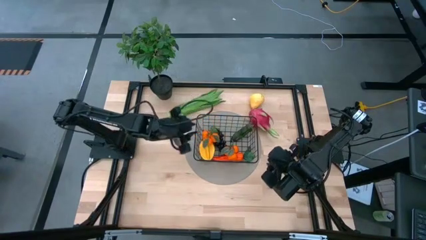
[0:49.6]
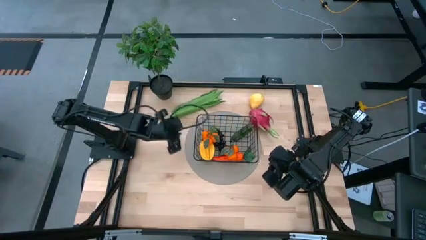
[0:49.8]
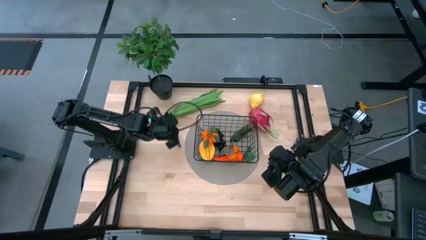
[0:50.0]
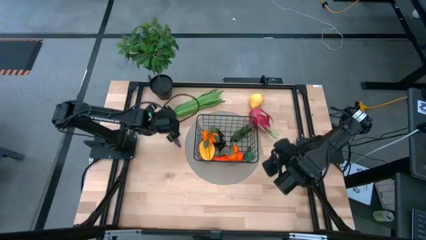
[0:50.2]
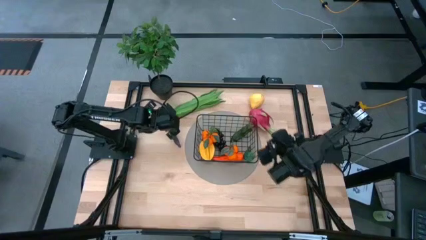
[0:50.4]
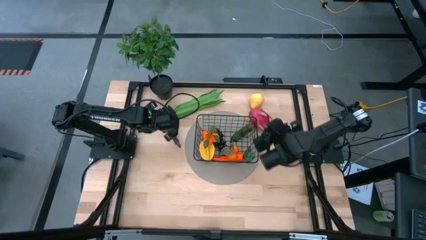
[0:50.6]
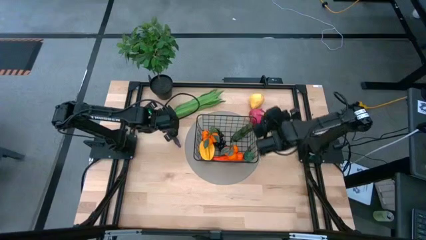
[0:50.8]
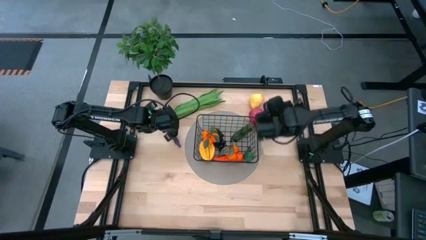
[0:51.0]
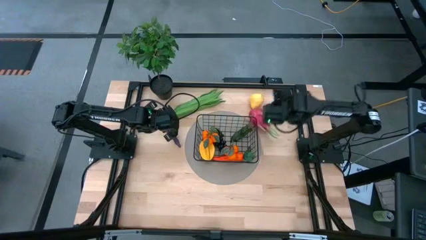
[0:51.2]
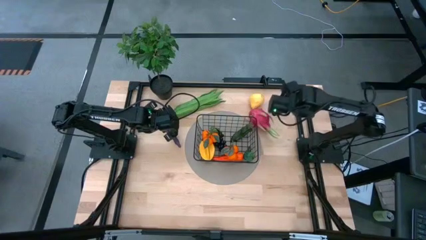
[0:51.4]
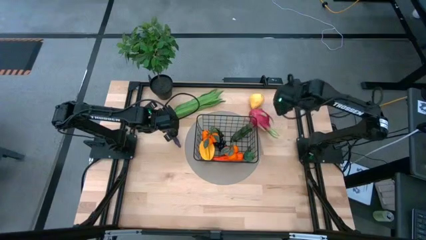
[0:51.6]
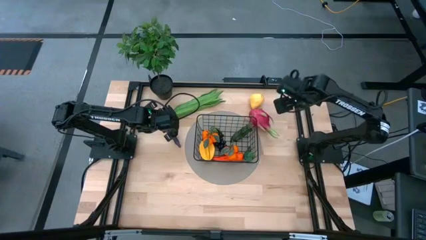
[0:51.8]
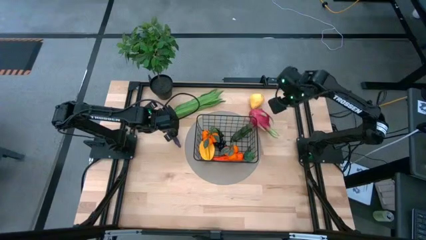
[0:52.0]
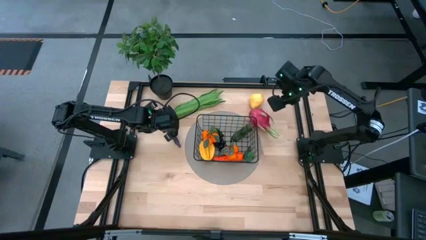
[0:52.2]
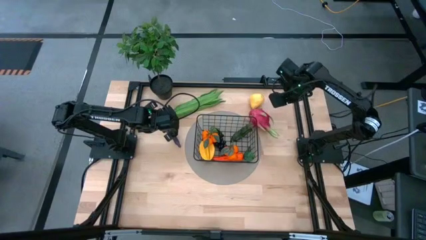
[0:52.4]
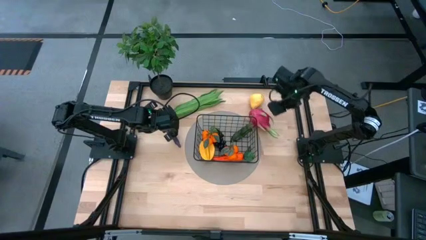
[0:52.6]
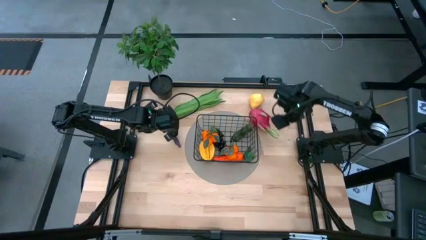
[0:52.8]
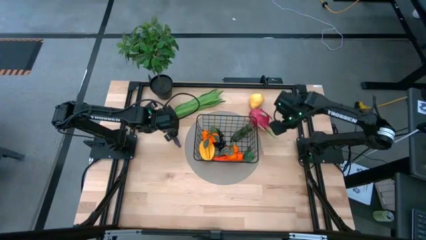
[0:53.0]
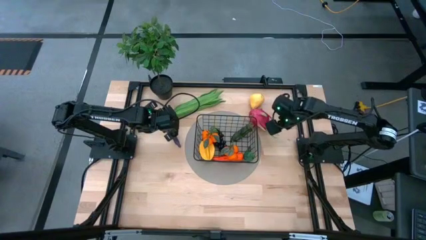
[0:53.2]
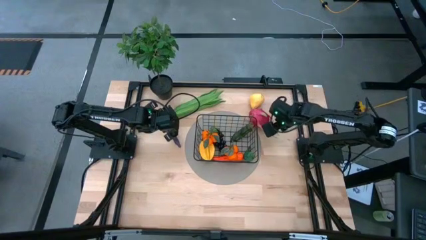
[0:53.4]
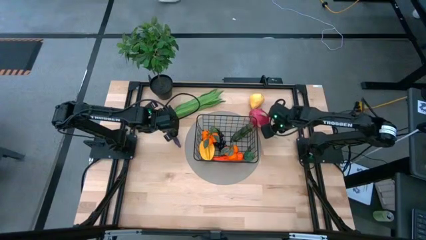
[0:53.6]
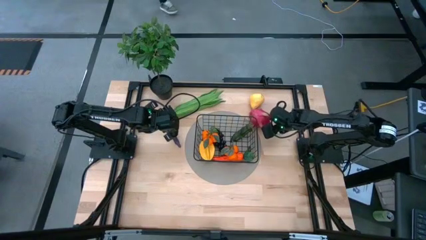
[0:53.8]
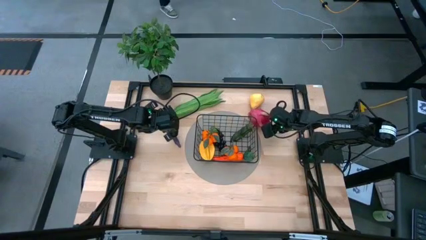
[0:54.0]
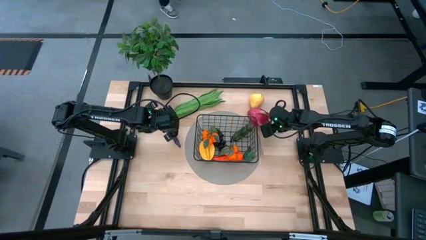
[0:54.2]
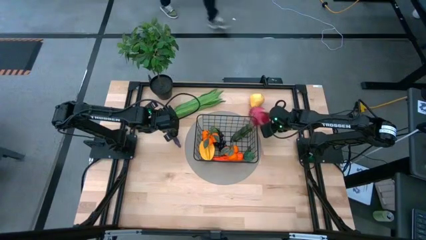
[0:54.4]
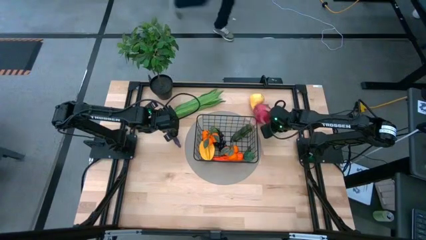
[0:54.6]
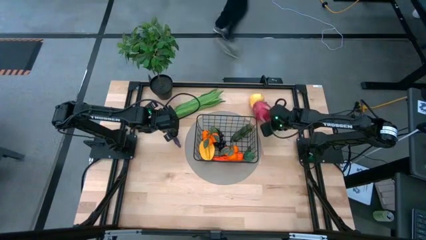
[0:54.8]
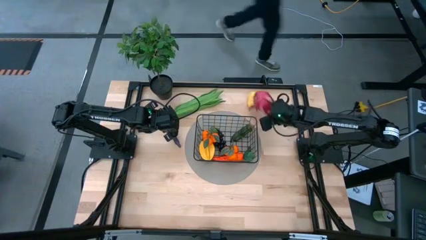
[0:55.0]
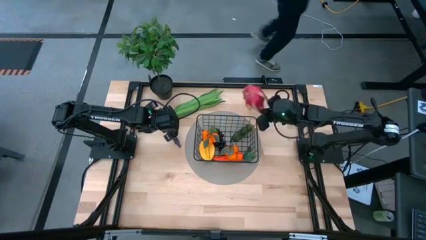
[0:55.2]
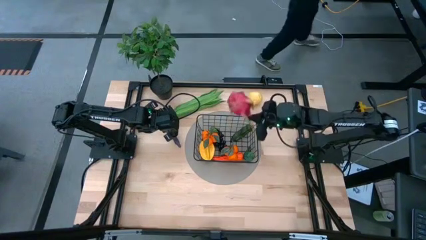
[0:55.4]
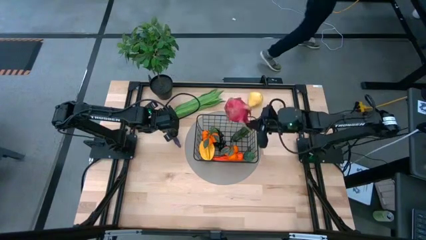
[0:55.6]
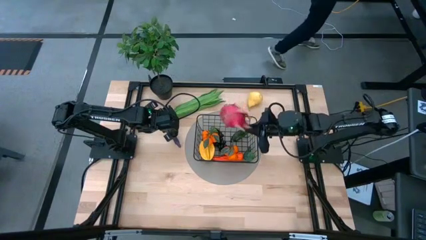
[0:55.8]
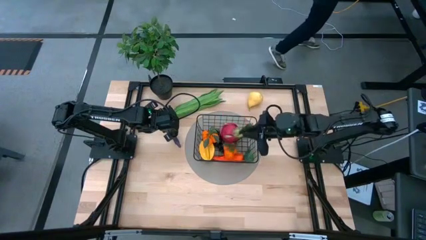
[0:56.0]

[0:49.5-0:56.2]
Task: Build produce basket
Put the red dragon fruit into the black wire basket

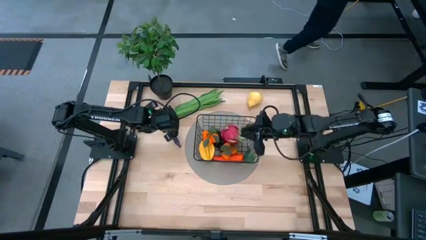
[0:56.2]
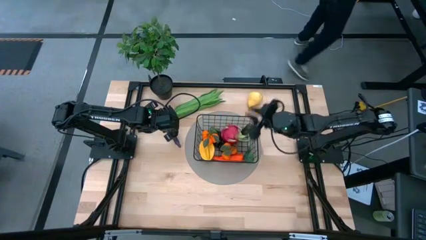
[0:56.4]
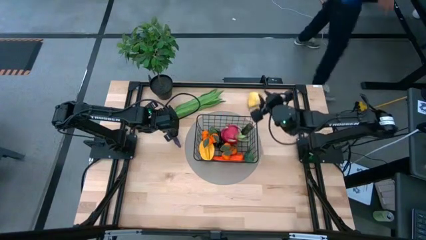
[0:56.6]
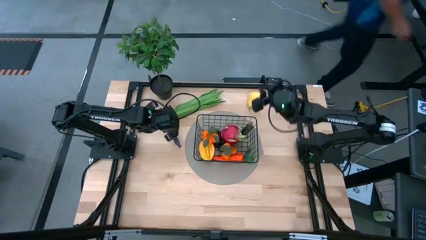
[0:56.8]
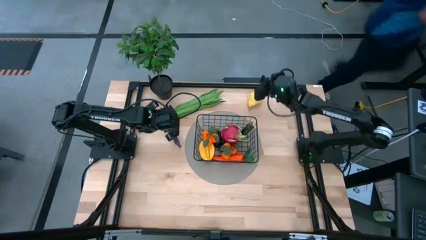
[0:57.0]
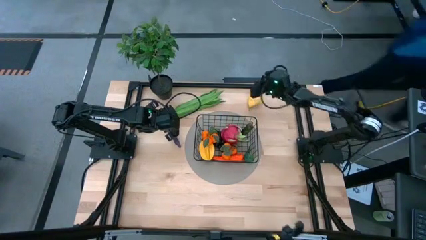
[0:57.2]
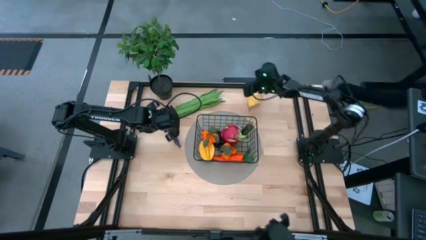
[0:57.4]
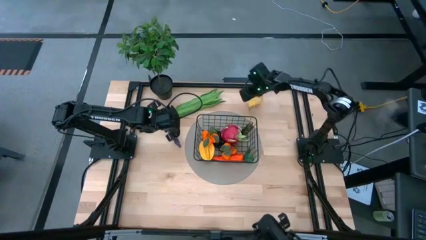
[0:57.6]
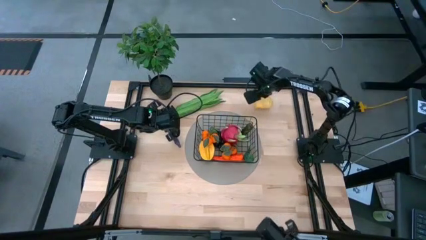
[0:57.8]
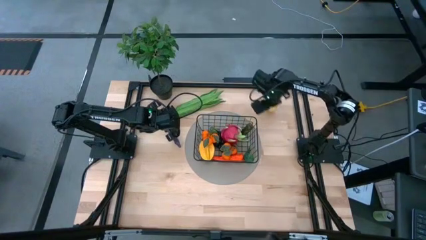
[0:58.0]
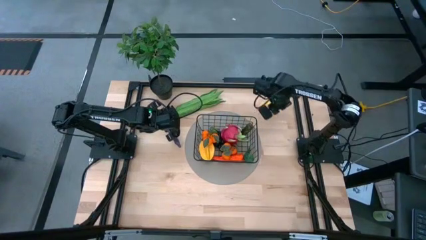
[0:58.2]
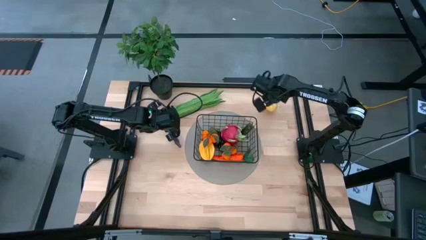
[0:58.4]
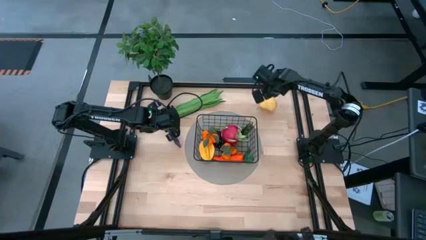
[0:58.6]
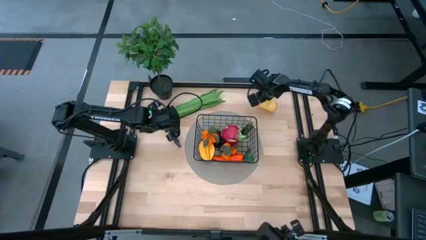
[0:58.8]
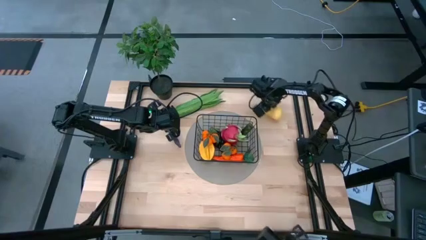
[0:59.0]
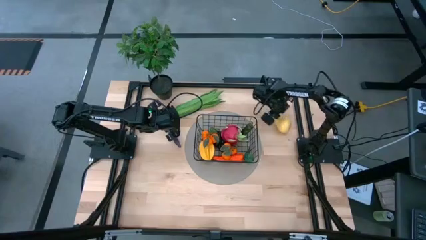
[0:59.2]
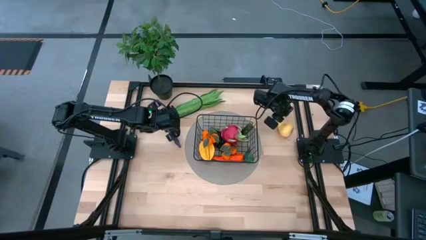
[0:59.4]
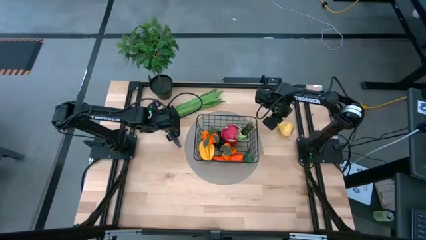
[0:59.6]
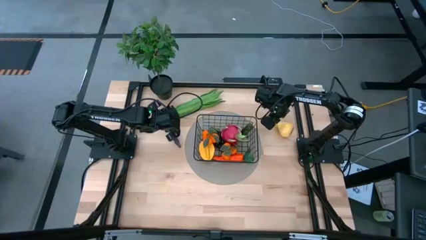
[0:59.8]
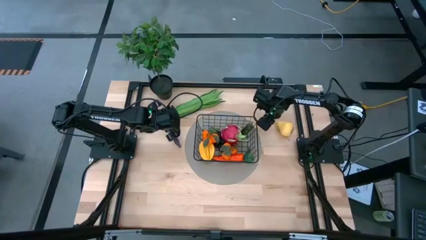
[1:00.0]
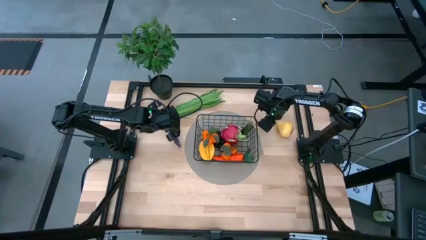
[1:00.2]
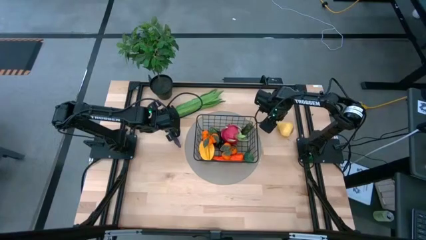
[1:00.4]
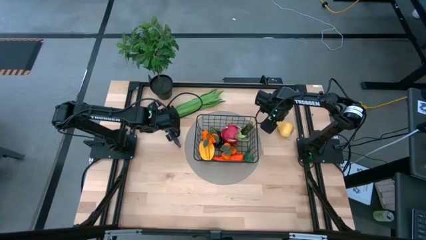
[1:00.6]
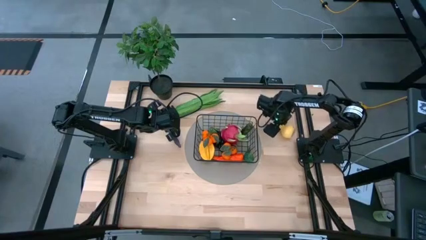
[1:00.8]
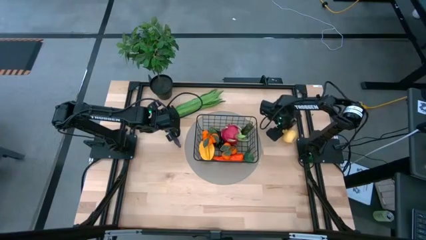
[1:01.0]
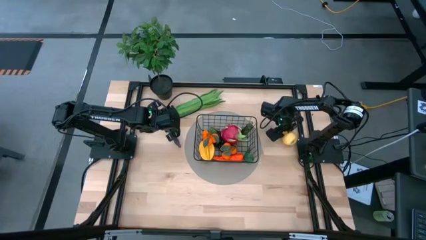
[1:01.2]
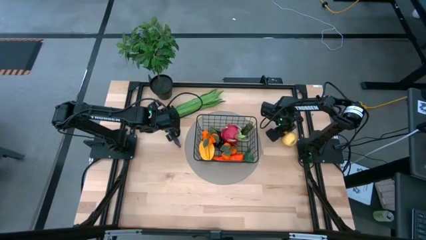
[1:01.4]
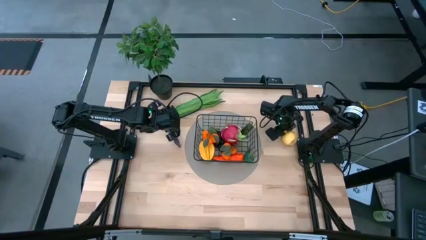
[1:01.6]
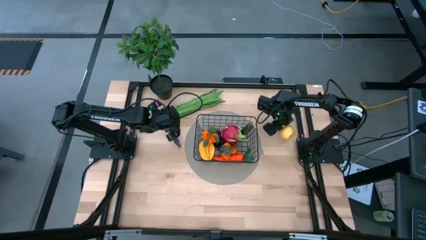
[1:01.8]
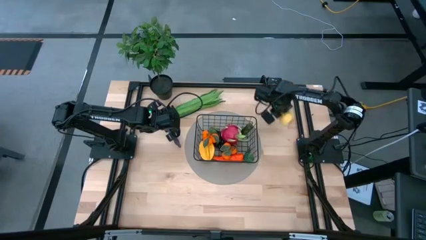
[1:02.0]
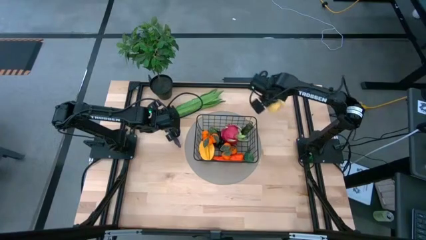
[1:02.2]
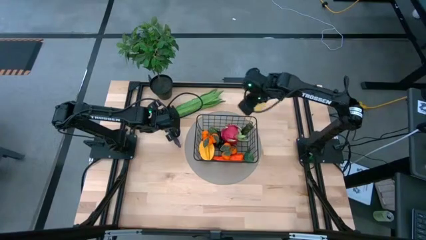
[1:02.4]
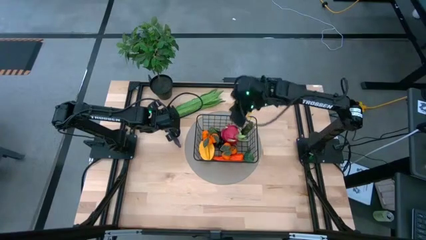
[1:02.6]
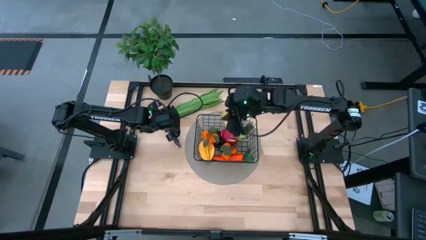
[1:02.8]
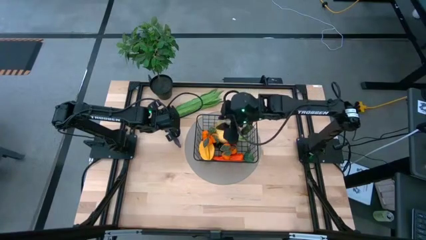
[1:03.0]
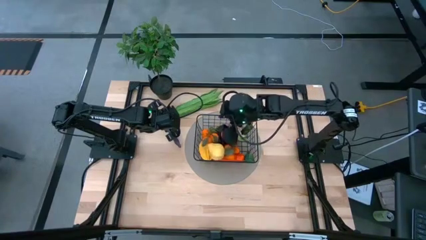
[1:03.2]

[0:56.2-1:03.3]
Put the yellow pear into the black wire basket

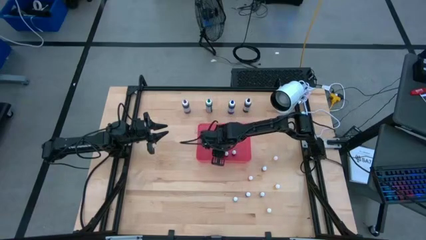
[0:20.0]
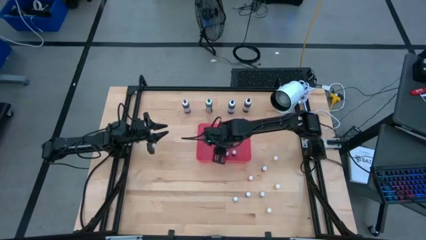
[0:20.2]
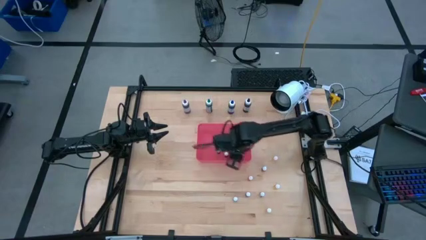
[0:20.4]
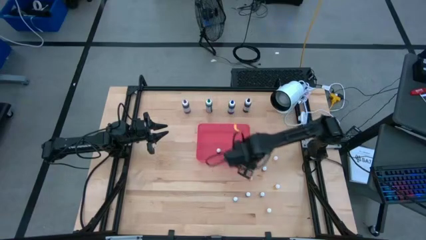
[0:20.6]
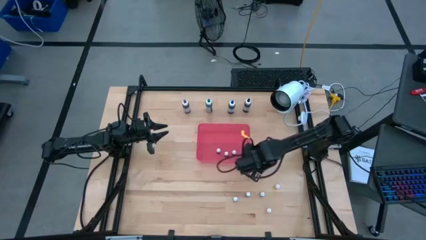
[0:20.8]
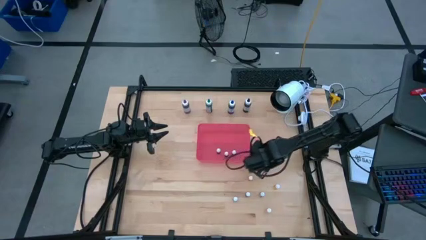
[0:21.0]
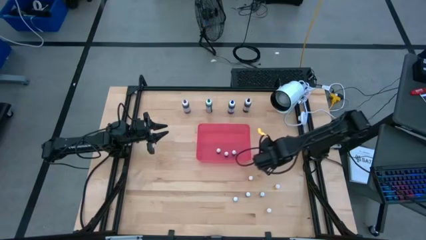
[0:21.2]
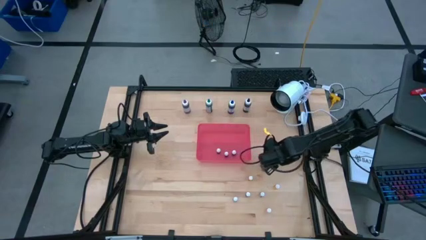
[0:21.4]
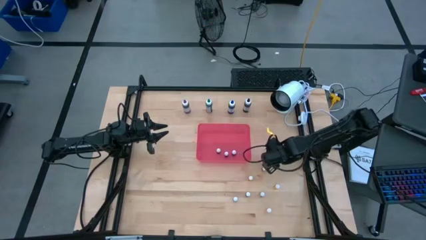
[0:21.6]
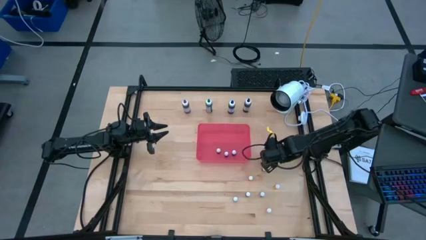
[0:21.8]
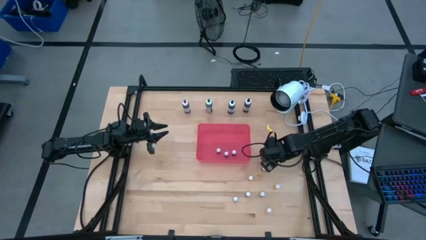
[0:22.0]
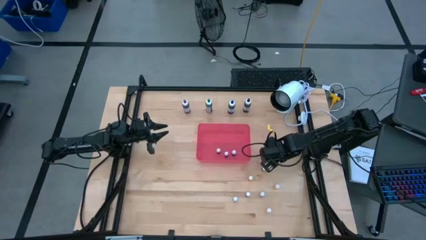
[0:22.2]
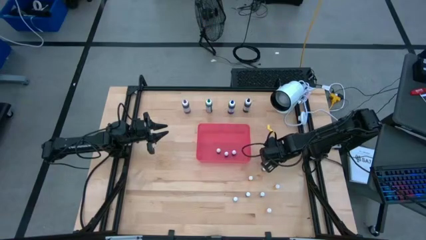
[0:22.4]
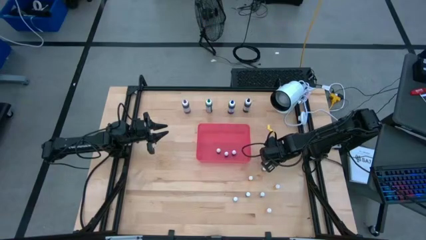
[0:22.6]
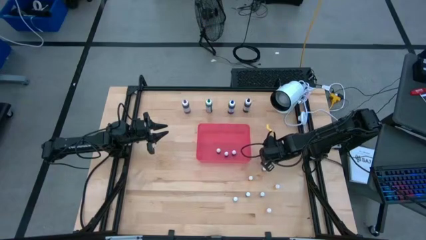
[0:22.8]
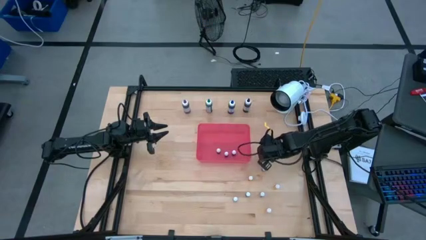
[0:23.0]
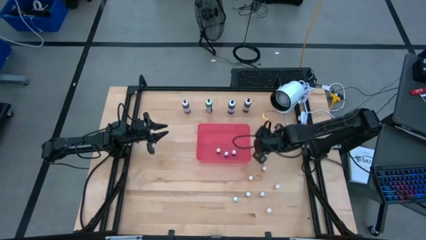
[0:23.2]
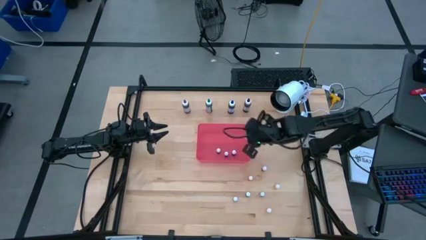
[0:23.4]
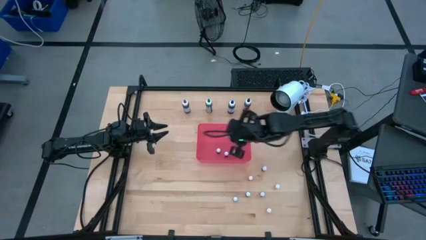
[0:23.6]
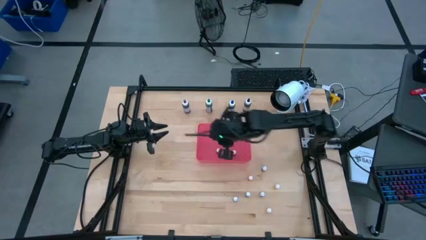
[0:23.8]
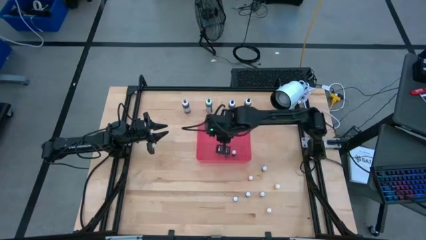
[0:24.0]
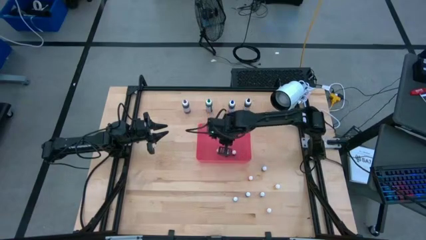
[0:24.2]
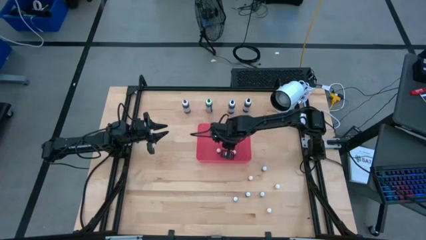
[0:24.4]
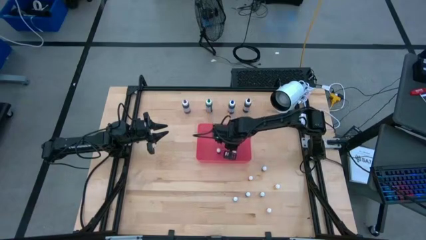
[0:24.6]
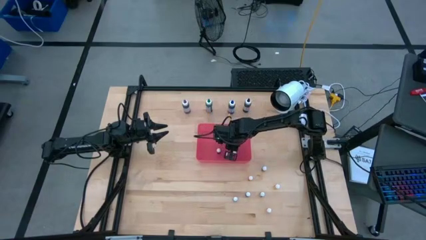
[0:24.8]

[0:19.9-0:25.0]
Task: Pick & Place food coloring
Put the small orange food coloring bottle into the red bin
